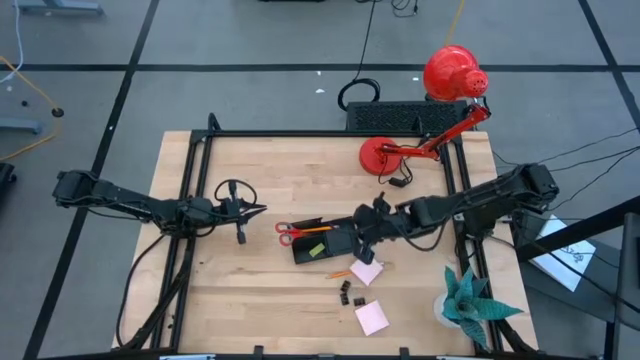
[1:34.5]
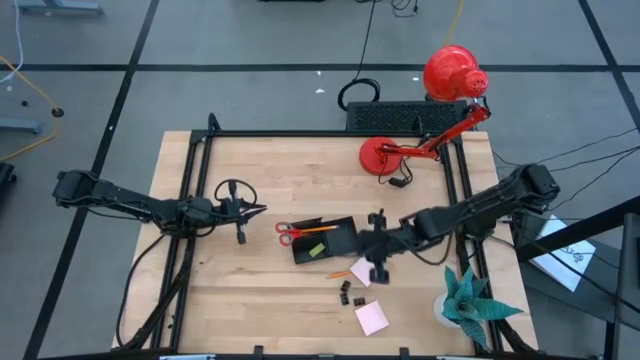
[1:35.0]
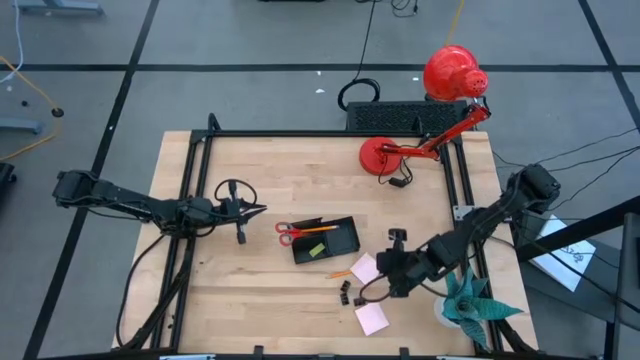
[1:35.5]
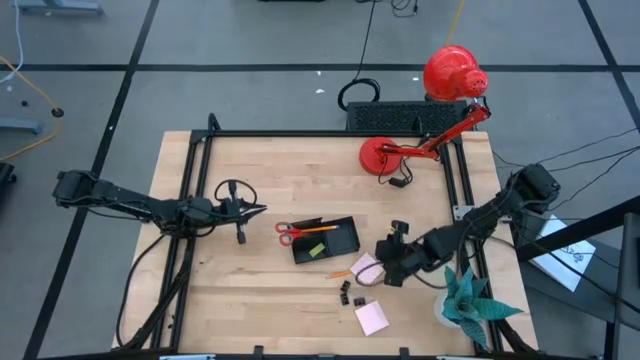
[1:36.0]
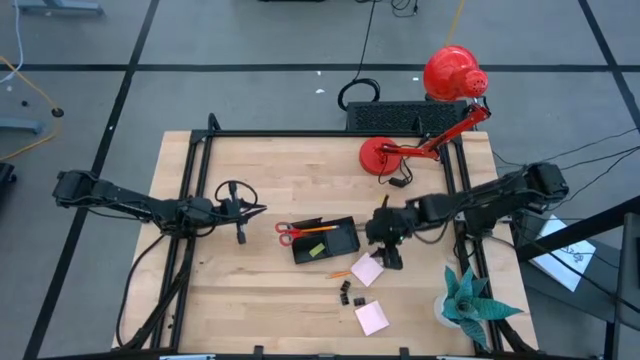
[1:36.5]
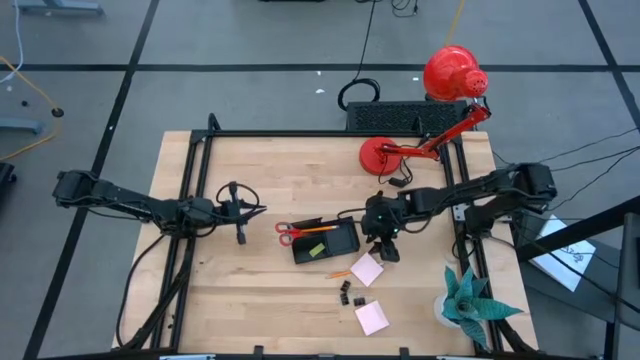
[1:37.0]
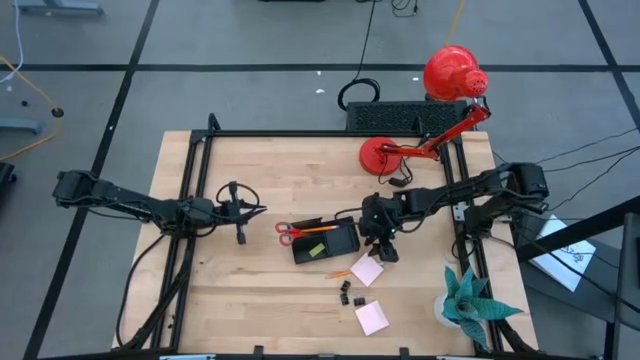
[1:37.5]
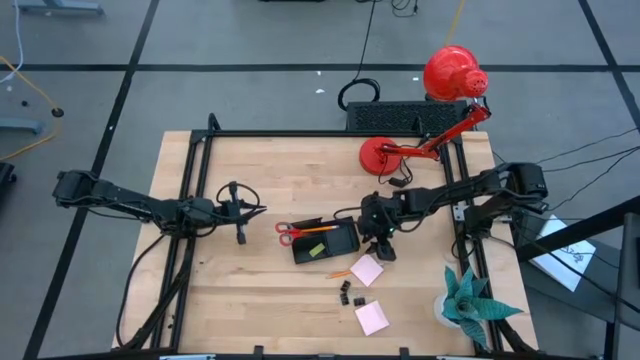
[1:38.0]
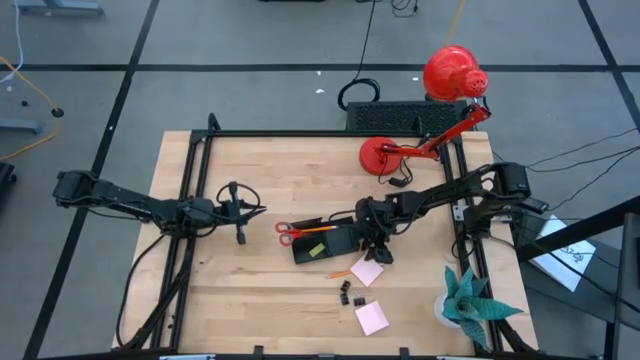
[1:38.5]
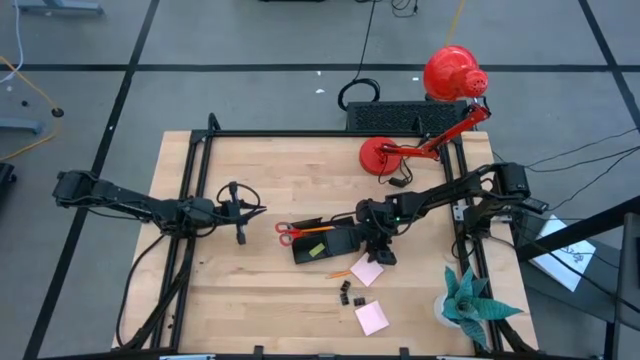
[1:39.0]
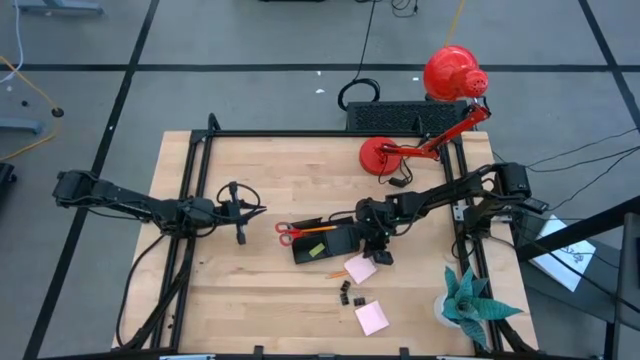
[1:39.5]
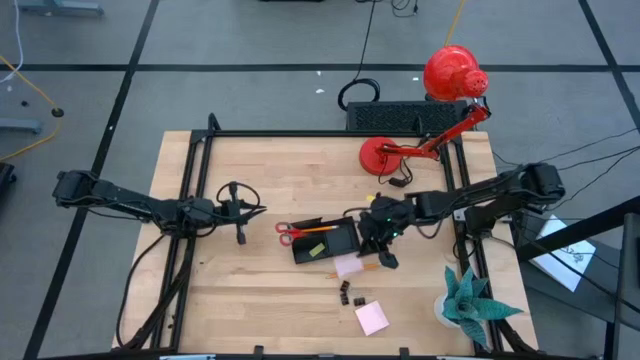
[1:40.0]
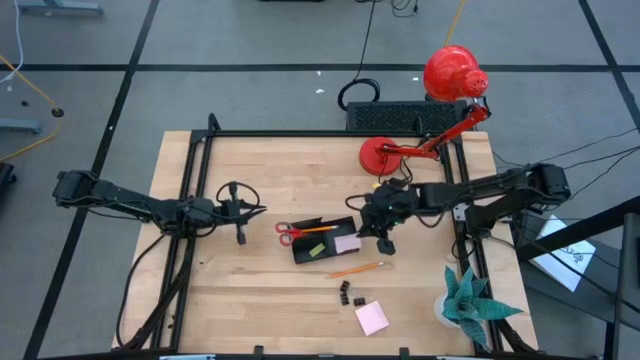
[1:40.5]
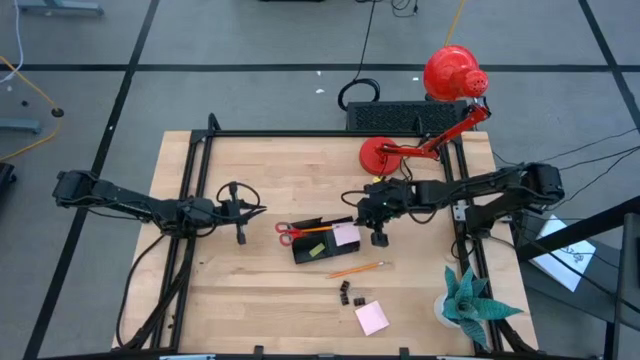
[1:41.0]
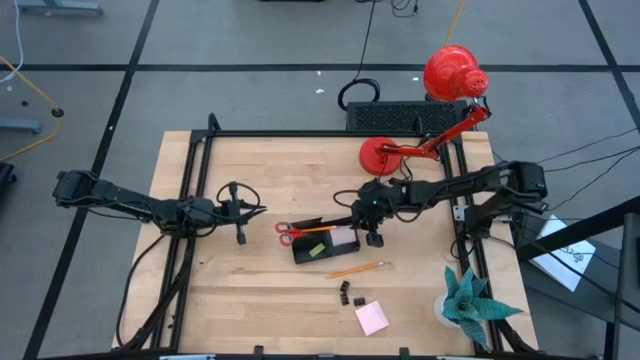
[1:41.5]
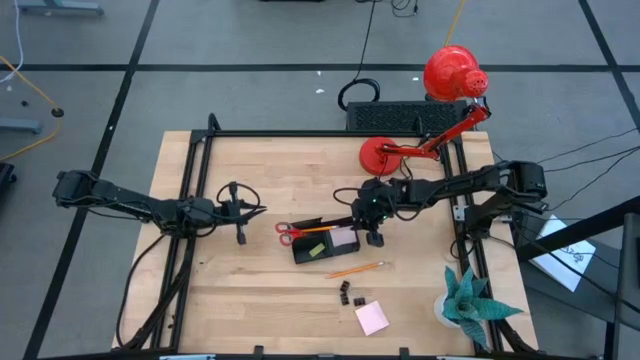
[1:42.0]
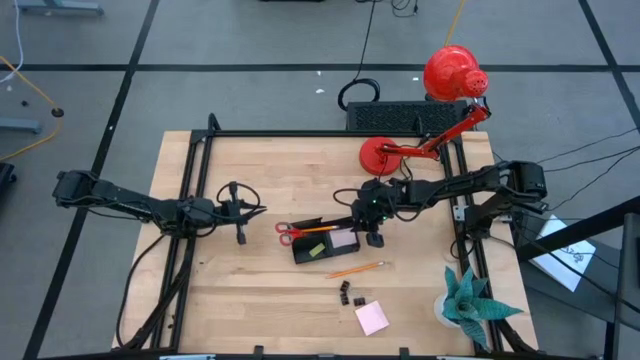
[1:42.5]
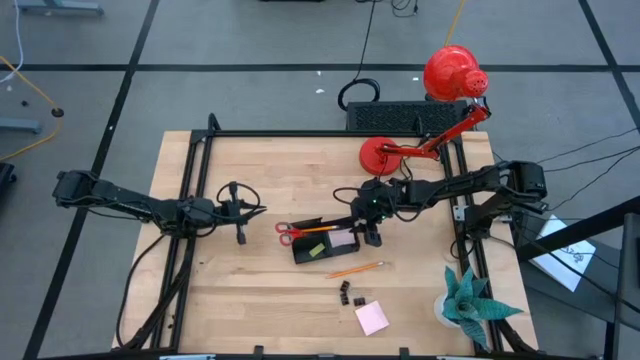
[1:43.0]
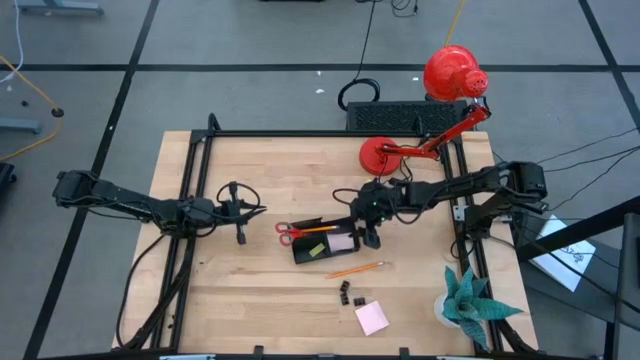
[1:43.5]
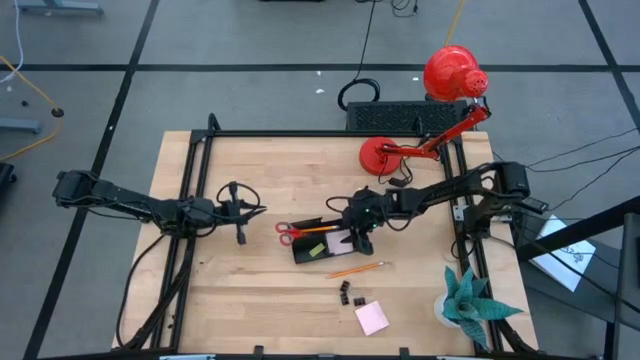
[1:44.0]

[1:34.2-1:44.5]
Task: Pick and place office supplies into organizer
Put the top sticky note into the right compartment of the desk organizer

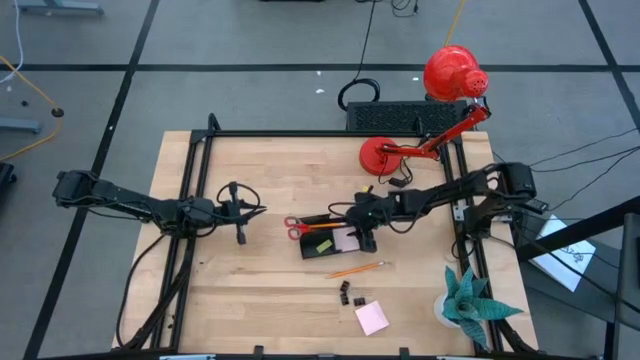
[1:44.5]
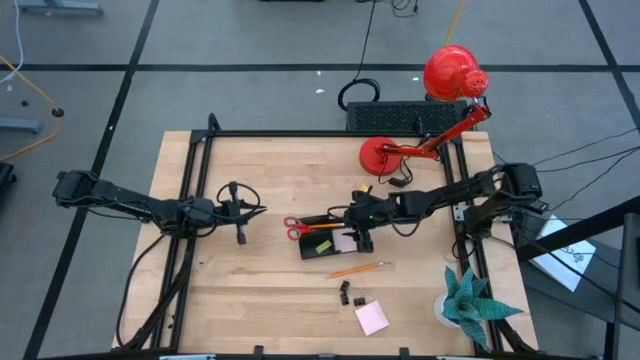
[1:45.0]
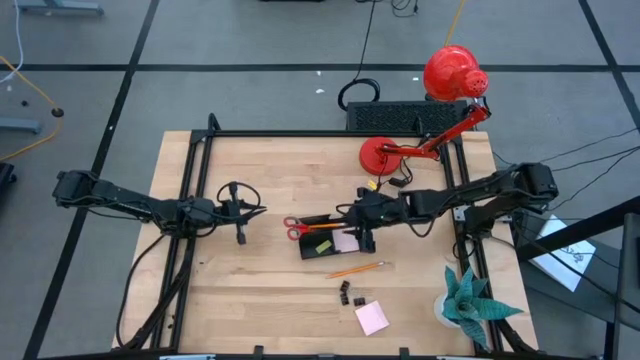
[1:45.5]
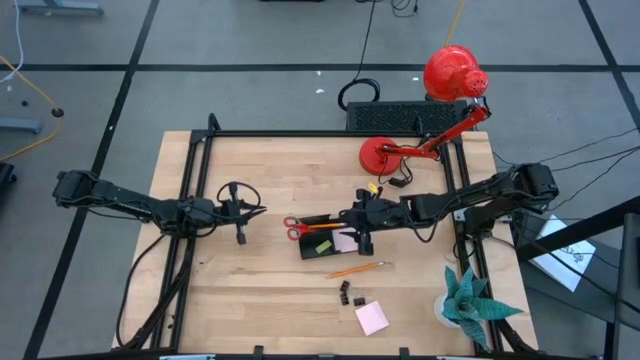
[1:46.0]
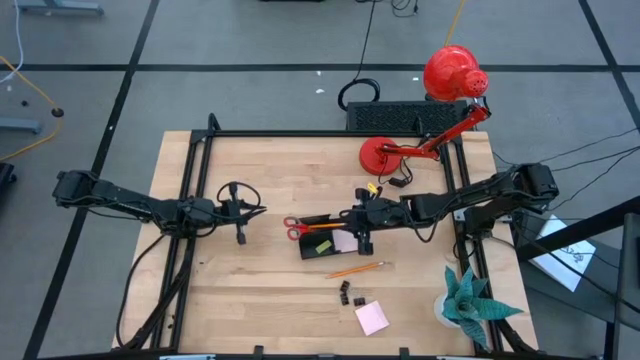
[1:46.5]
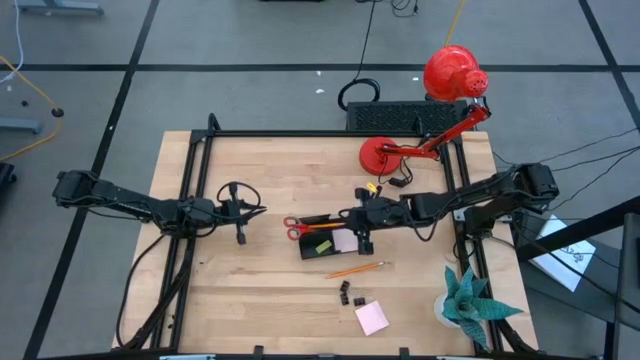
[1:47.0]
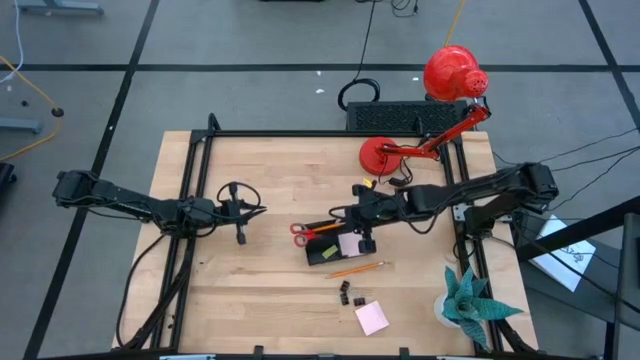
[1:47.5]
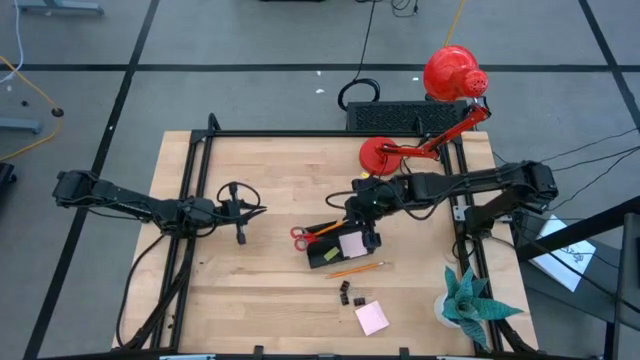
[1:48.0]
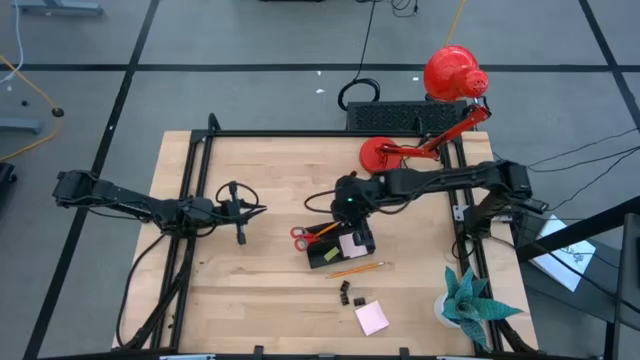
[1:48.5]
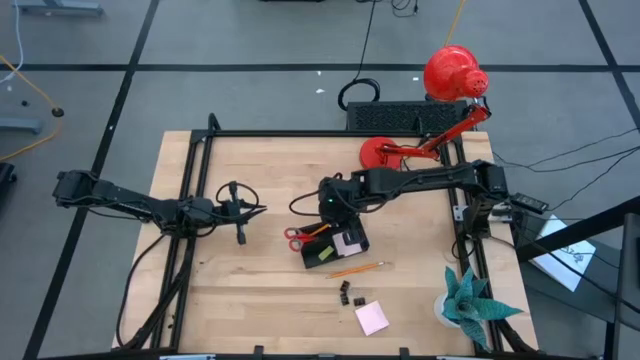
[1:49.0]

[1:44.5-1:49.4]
Adjust the pencil in the top left compartment of the desk organizer

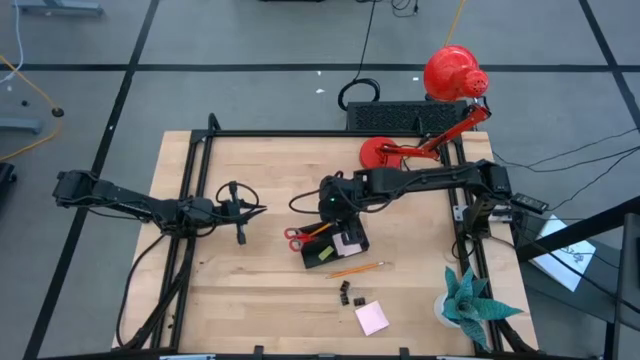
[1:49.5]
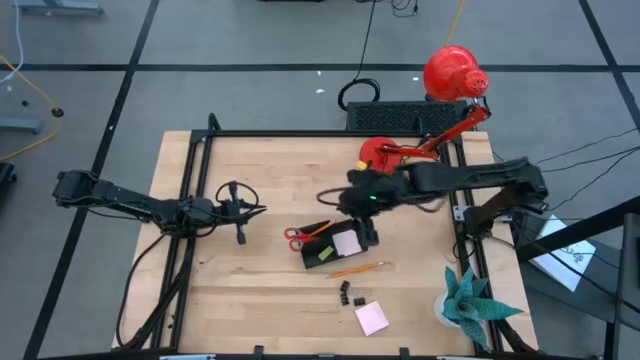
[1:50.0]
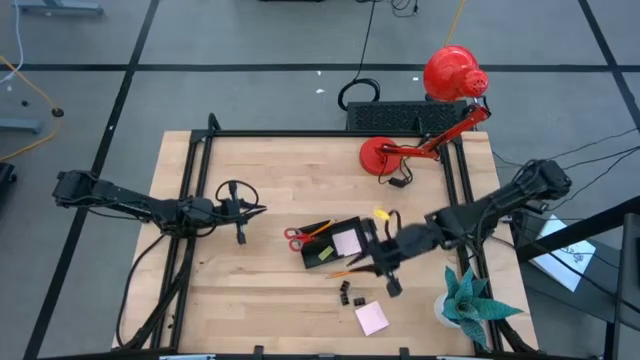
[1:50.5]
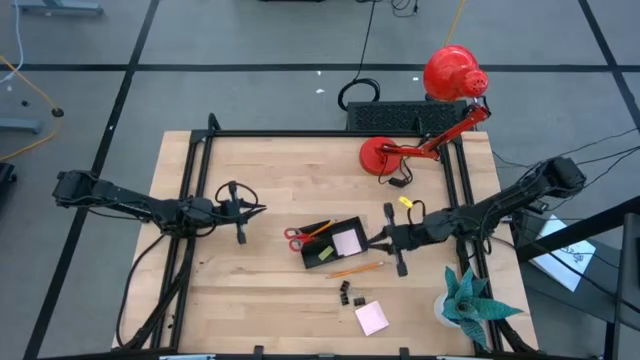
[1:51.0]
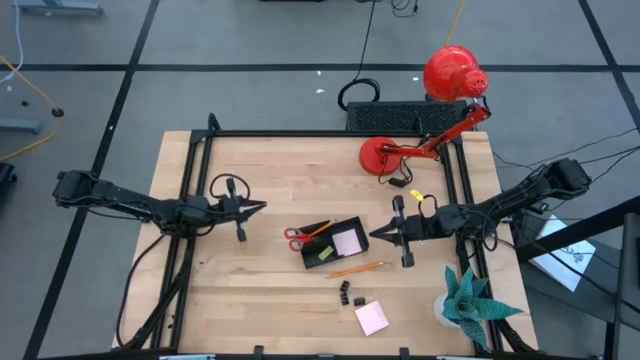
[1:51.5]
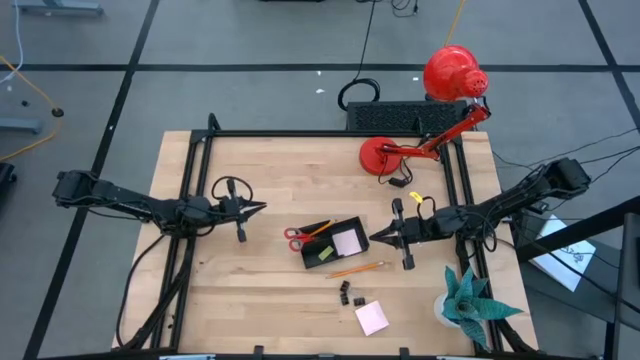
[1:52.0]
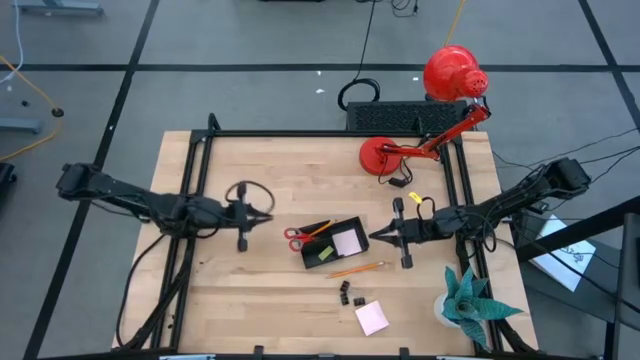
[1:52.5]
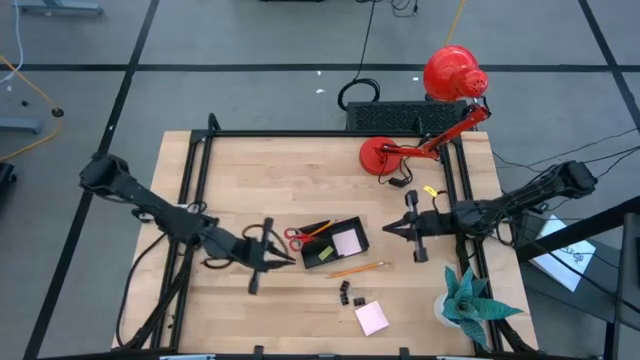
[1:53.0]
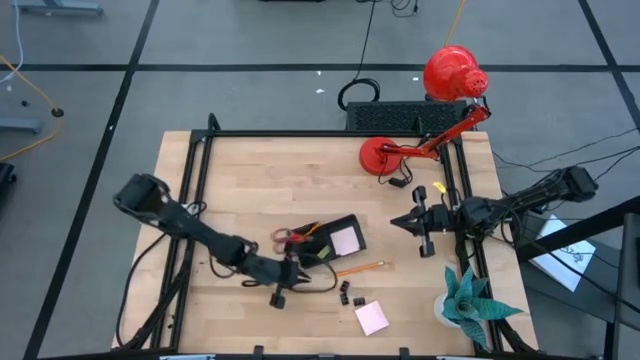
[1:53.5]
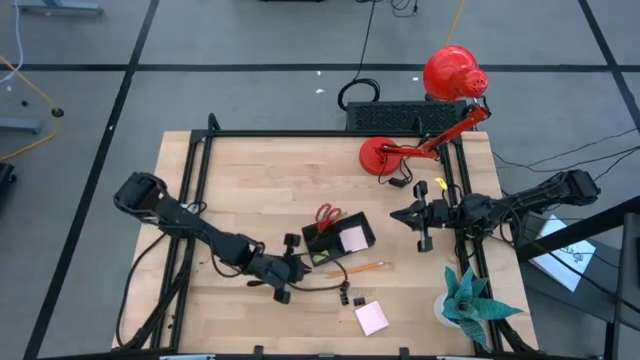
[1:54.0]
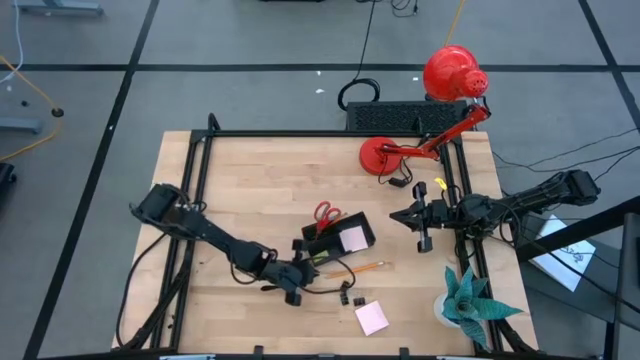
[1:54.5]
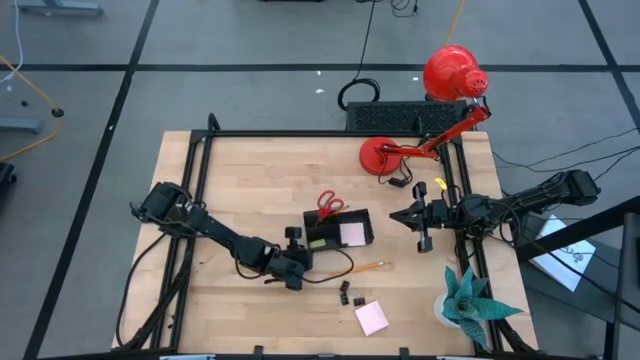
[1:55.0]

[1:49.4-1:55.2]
Adjust the desk organizer on the table
